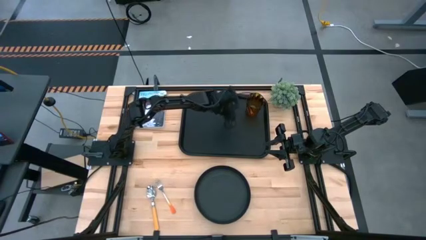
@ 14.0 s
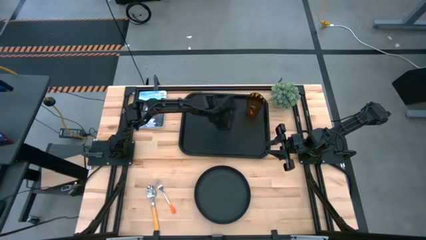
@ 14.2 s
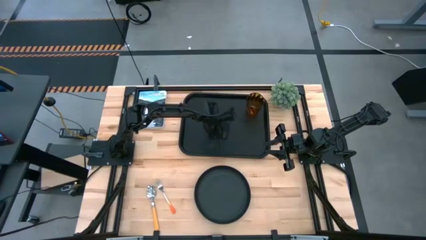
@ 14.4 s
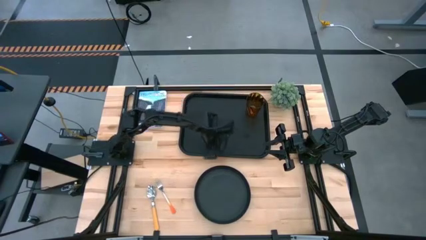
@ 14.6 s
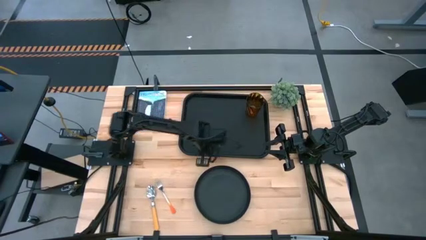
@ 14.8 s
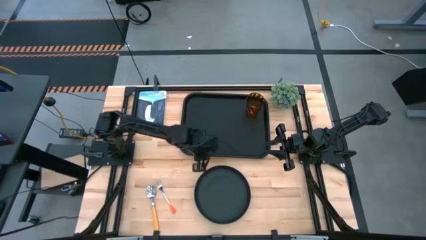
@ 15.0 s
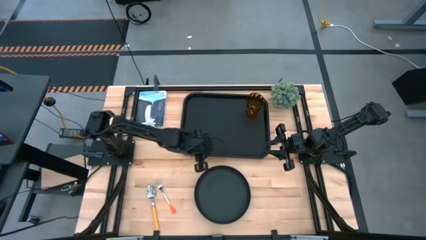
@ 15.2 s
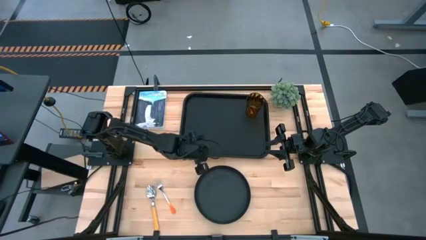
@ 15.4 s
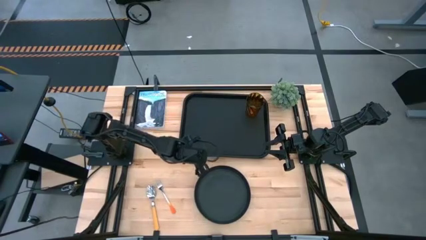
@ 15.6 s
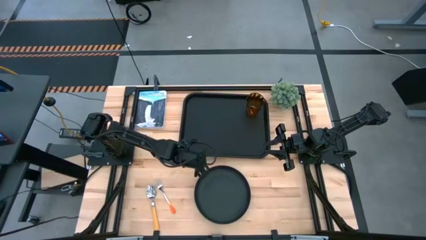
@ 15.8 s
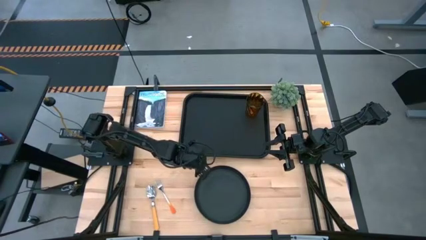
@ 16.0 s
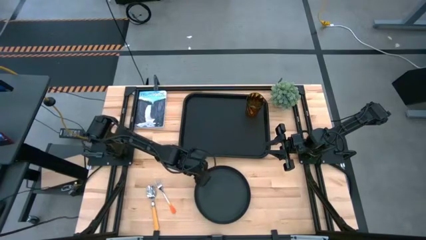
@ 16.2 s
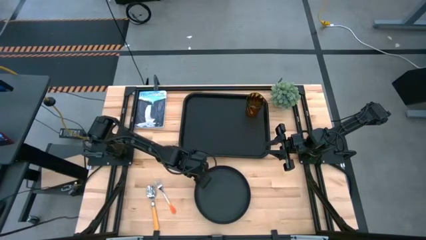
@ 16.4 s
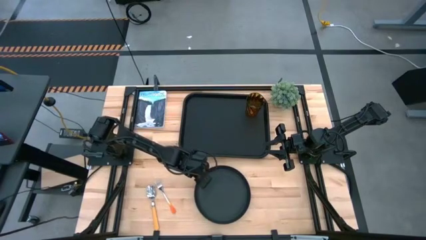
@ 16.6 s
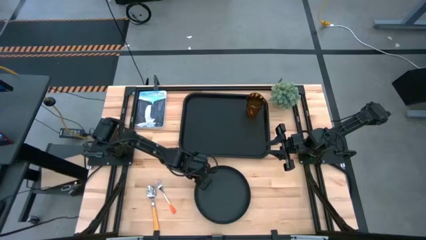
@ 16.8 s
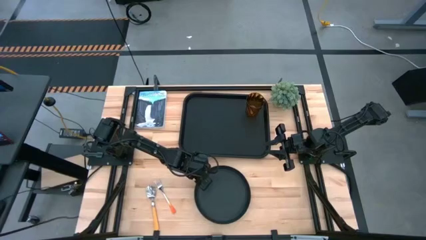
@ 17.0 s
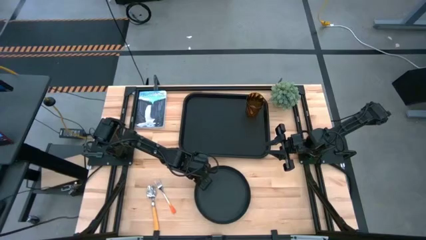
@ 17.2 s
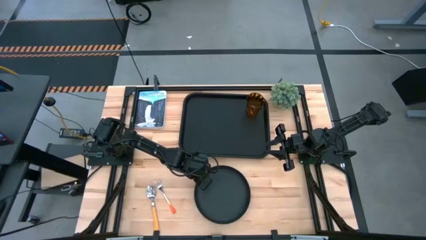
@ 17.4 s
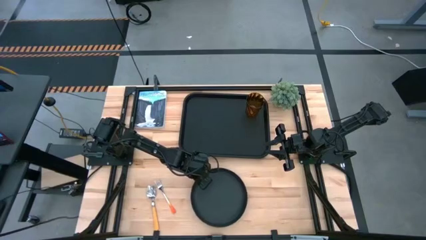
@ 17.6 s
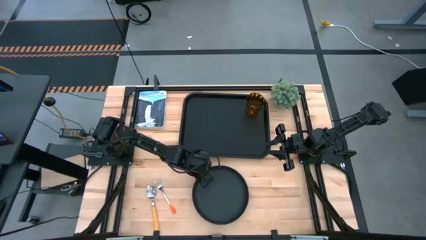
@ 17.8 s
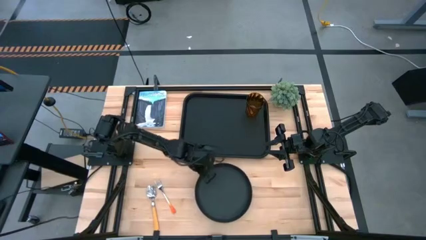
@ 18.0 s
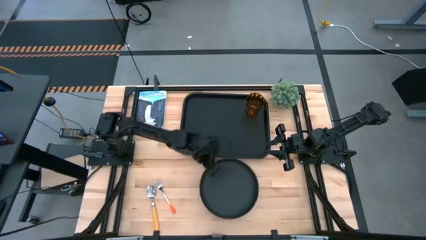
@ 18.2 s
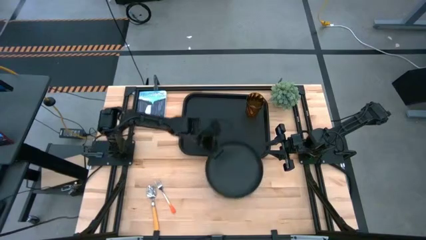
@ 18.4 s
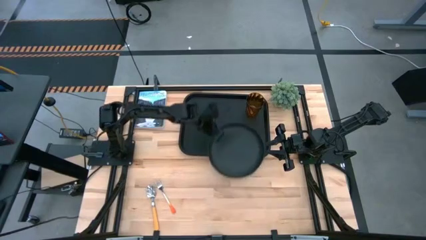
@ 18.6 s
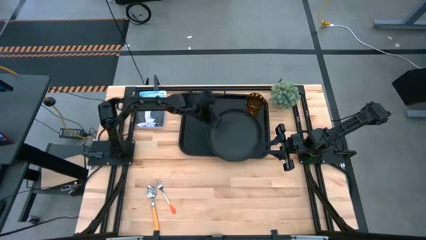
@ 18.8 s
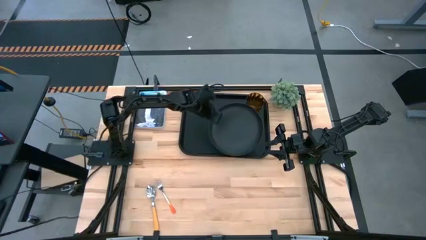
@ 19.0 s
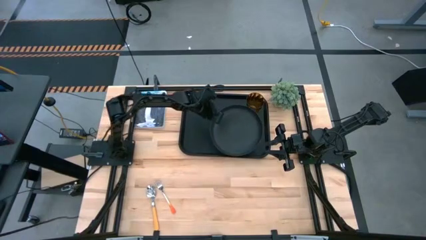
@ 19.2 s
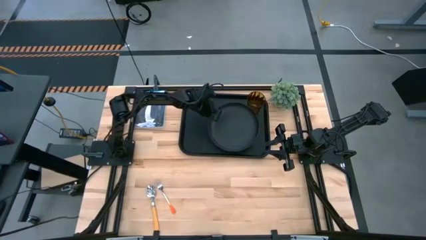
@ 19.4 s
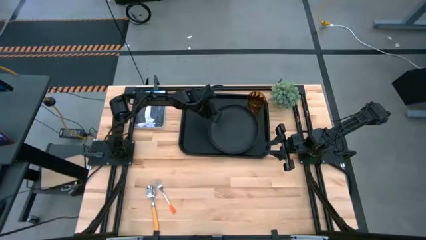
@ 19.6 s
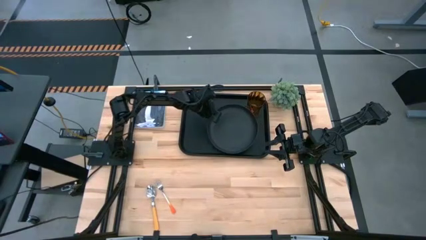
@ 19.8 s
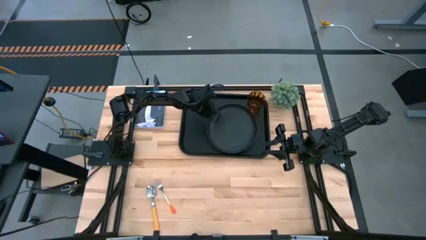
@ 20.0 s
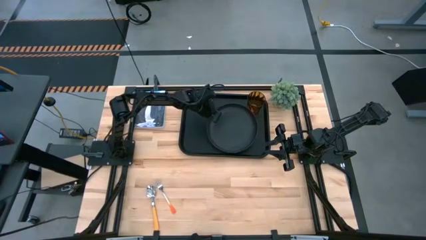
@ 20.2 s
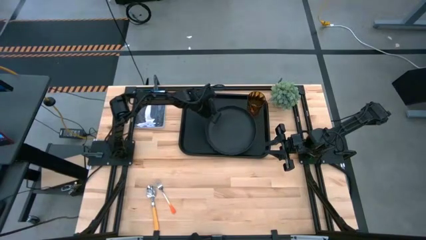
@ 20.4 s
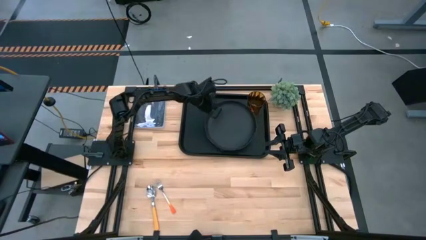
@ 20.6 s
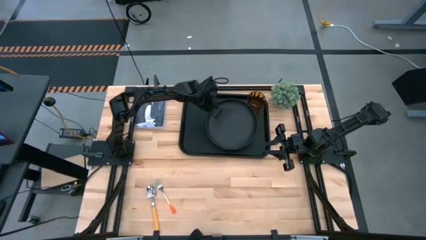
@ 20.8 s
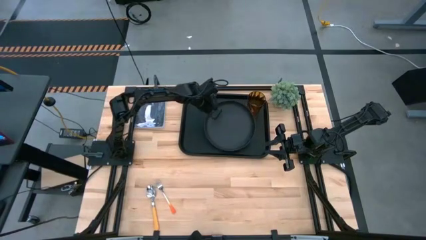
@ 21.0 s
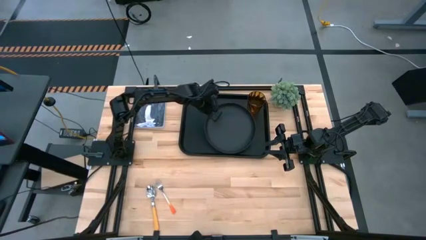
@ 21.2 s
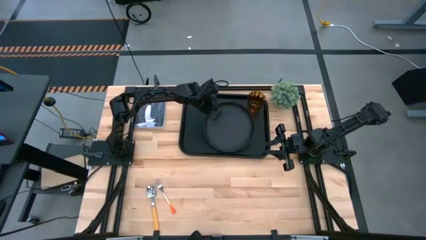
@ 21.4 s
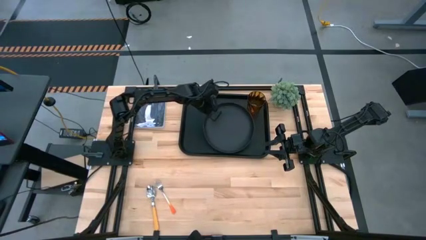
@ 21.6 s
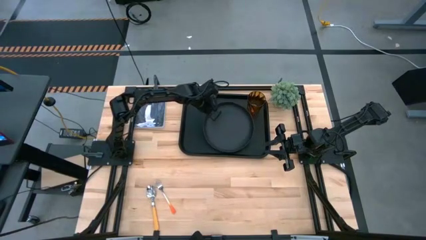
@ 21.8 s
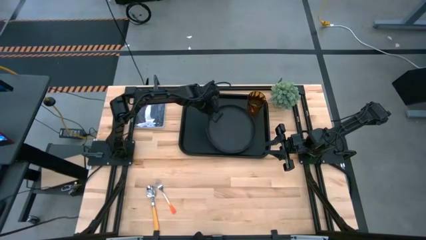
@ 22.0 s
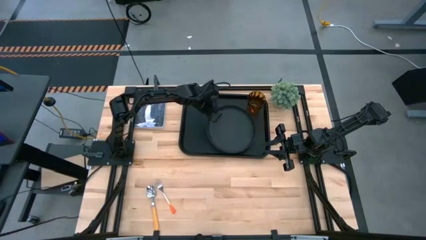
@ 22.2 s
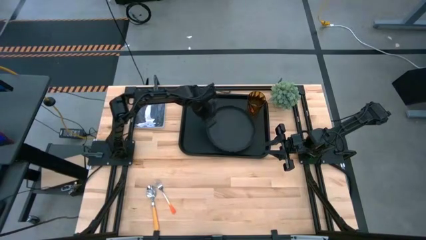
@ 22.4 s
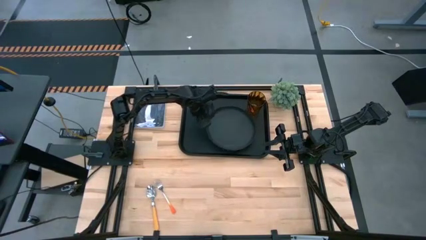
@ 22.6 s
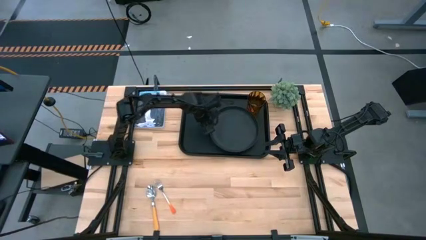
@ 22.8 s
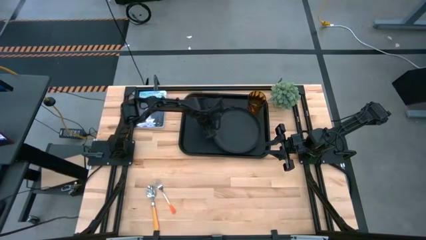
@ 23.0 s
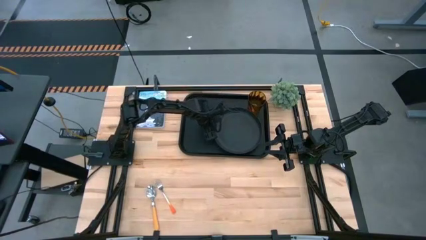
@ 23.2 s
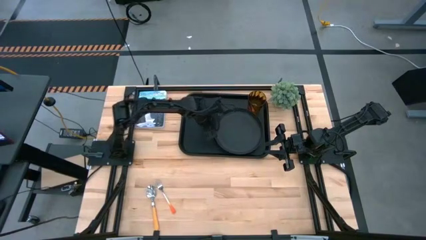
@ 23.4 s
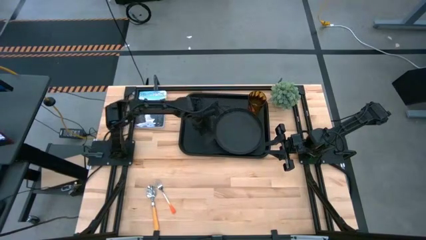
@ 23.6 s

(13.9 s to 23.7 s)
Task: Pick and place plate/cup/fork/spoon on tray
Put the black plate on the black tray

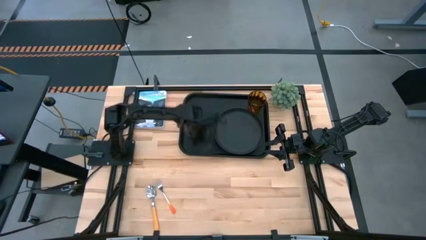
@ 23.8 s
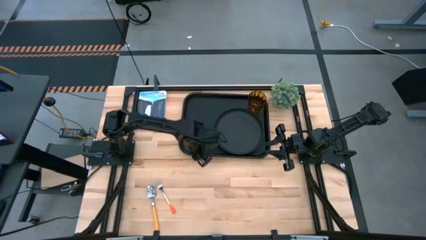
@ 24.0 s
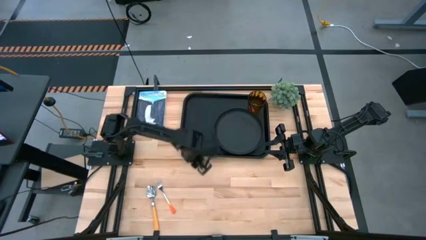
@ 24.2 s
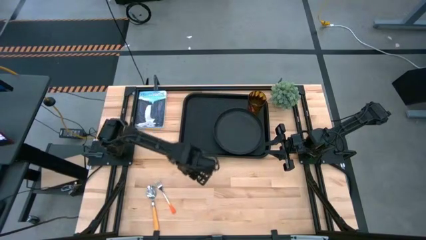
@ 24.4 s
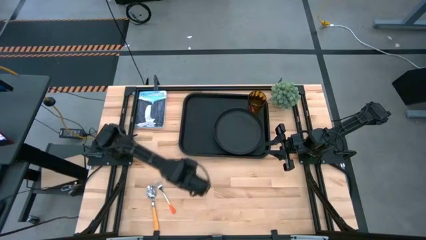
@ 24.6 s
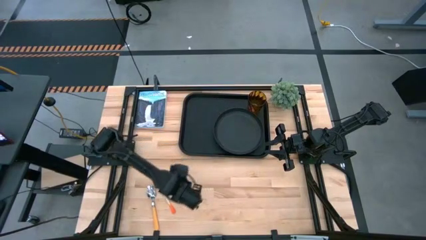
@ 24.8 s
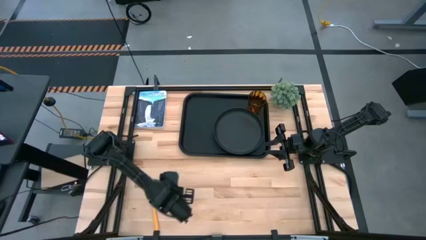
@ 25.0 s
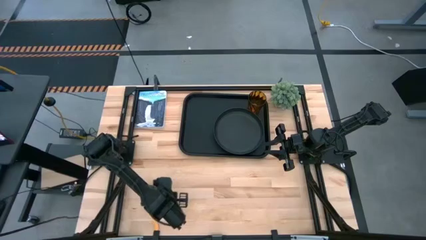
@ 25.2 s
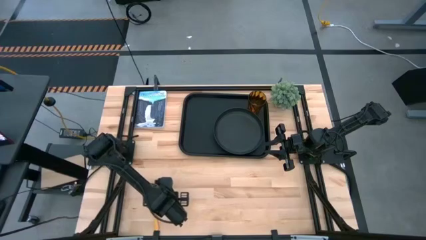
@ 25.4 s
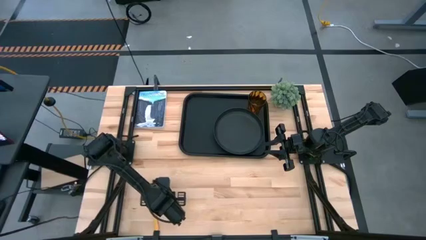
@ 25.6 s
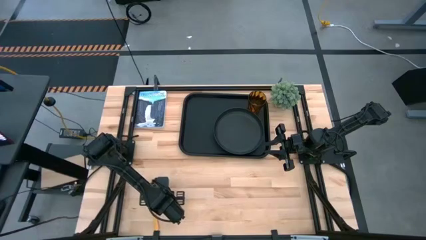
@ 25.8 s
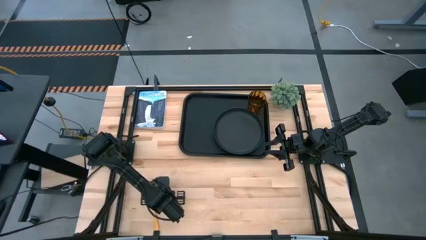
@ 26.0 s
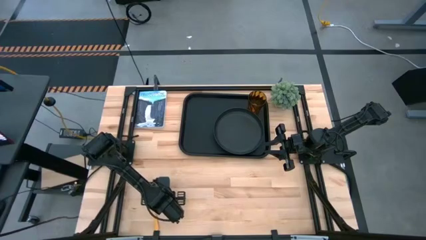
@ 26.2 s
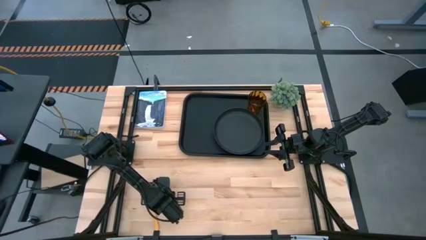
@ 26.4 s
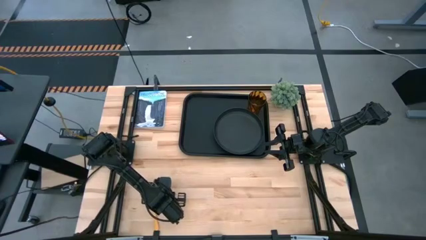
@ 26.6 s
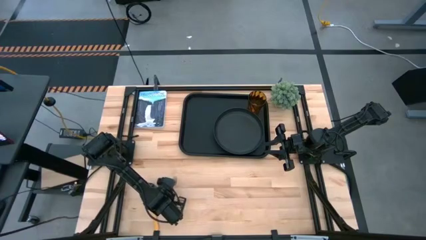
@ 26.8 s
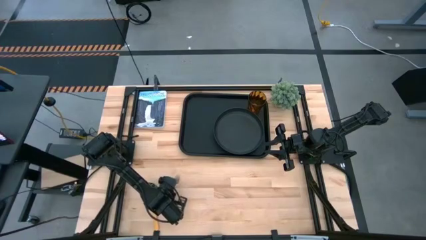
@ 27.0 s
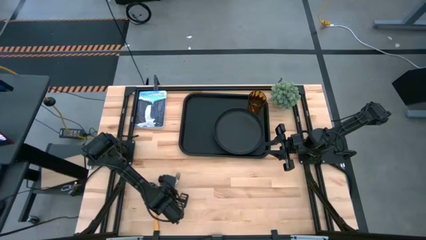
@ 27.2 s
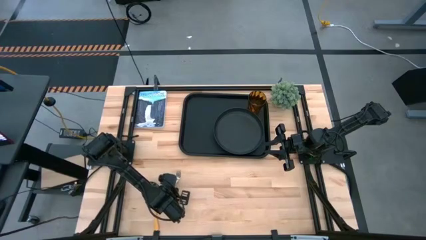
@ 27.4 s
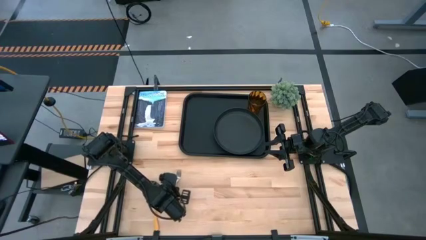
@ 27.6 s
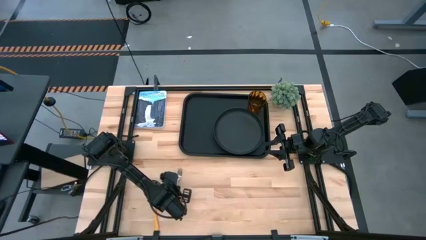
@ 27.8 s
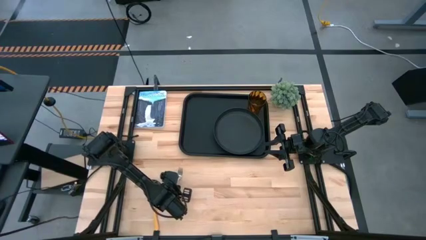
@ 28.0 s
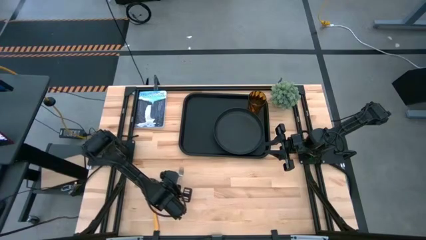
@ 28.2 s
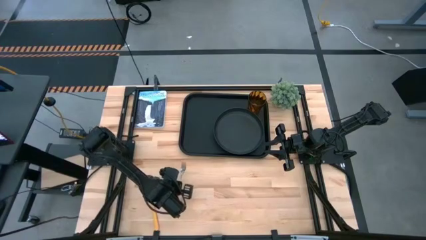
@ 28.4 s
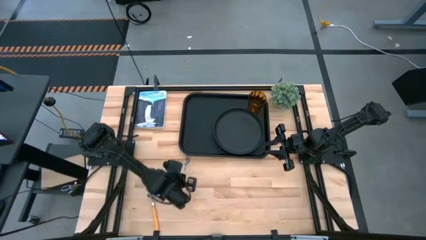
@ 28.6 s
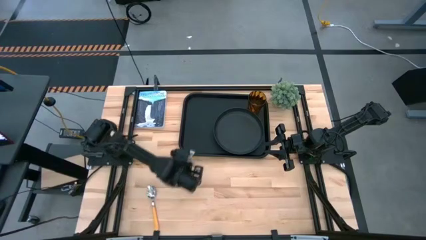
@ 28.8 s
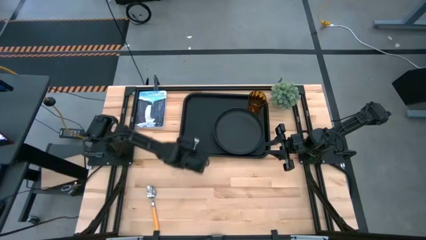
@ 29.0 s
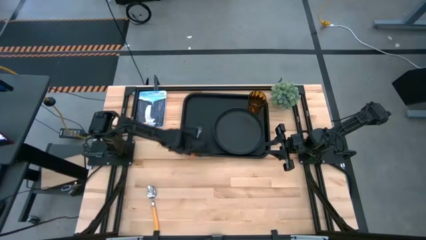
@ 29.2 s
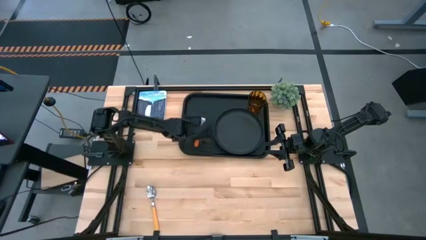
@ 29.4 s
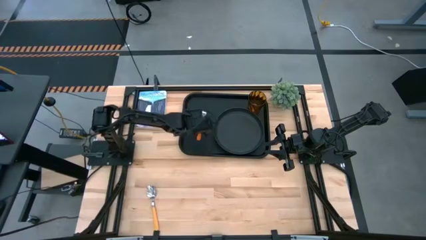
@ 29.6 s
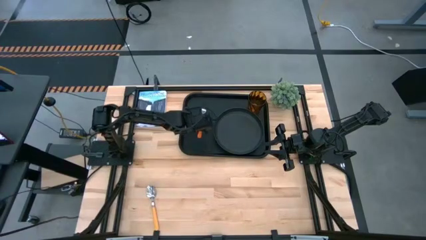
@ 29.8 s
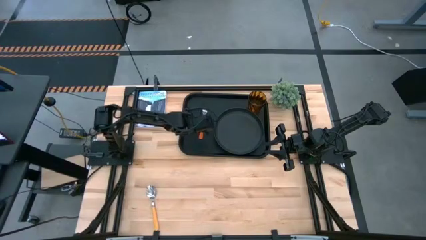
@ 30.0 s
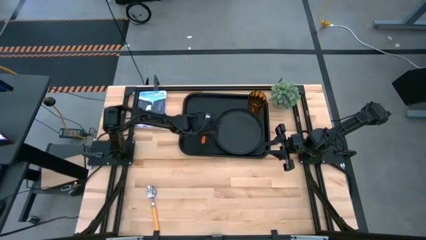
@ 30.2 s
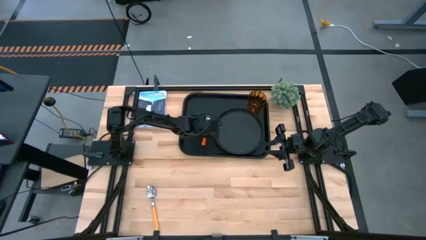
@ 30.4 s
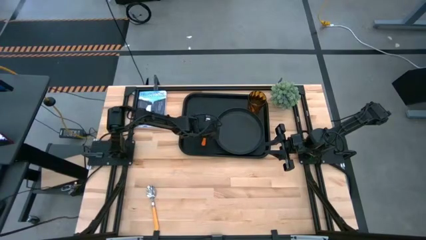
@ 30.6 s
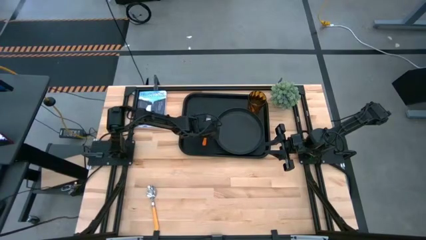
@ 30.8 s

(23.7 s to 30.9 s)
Put the fork to the left of the black plate on the black tray
